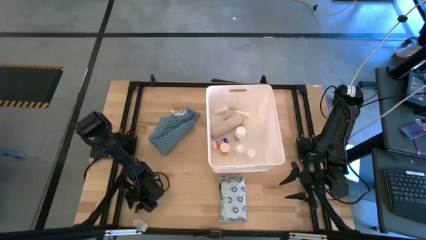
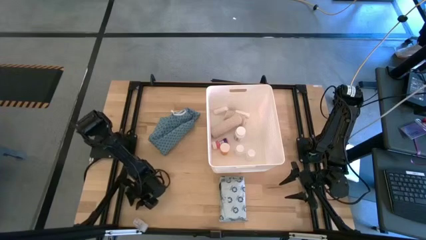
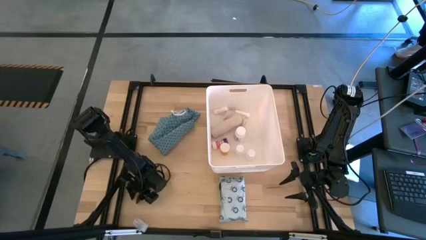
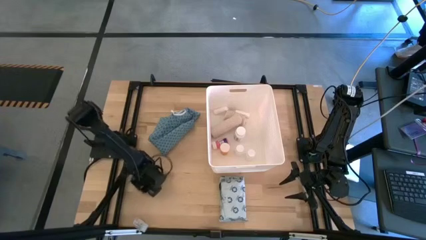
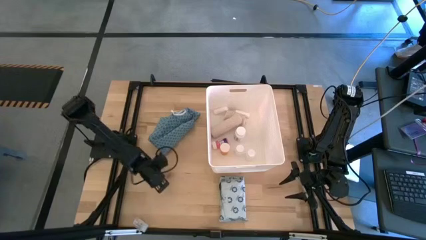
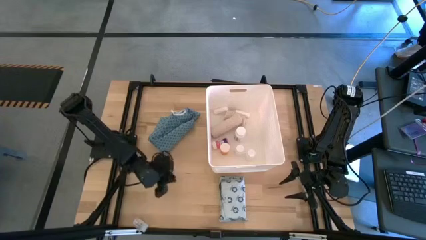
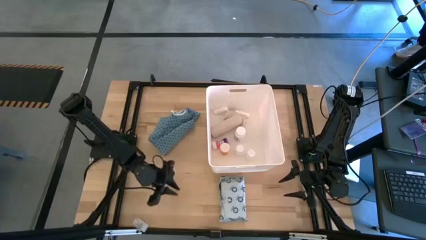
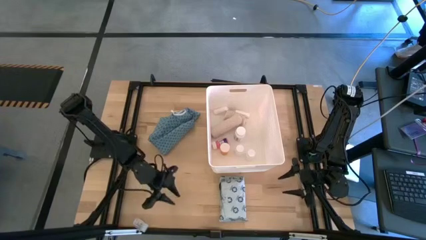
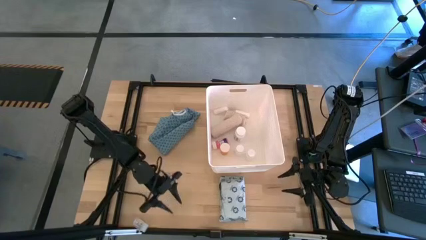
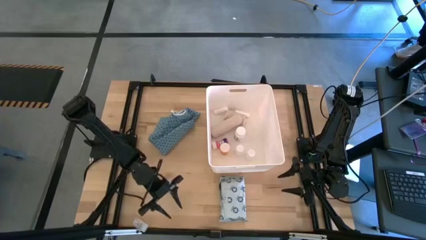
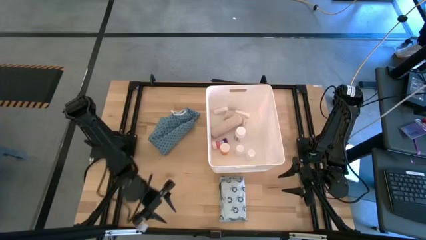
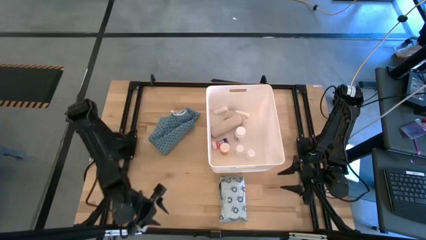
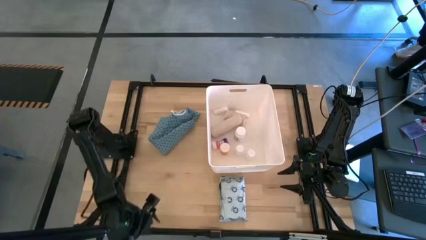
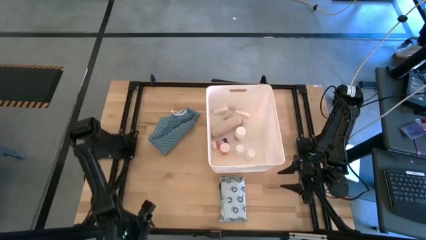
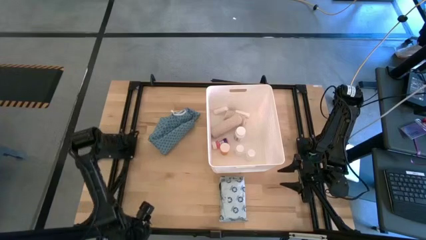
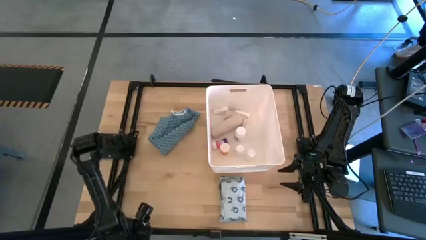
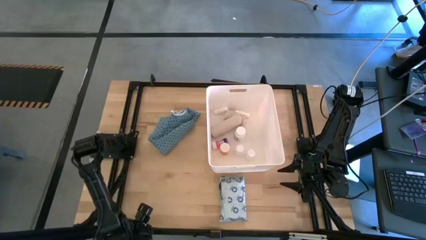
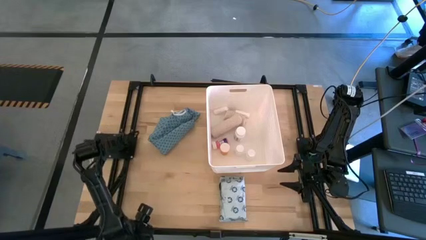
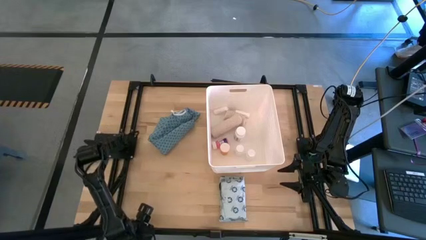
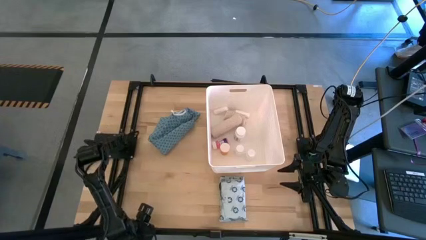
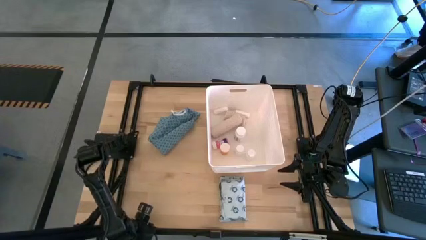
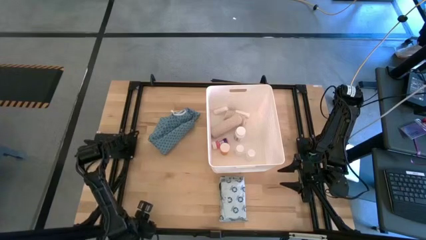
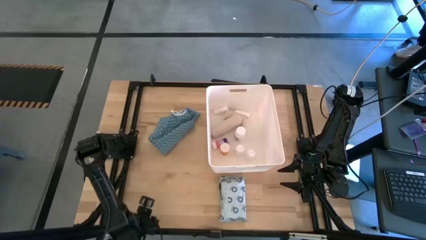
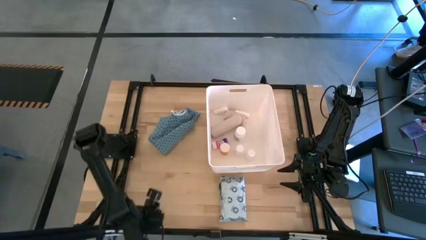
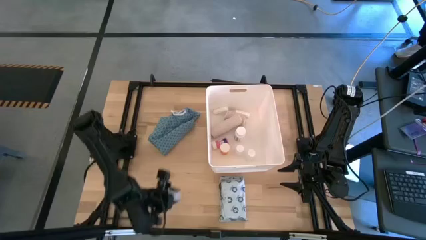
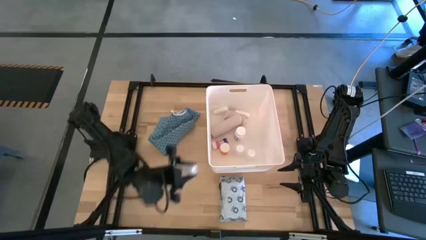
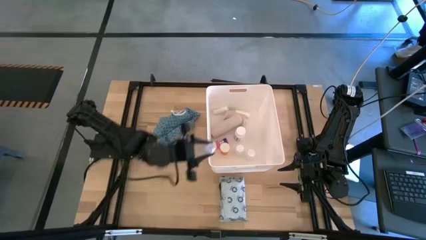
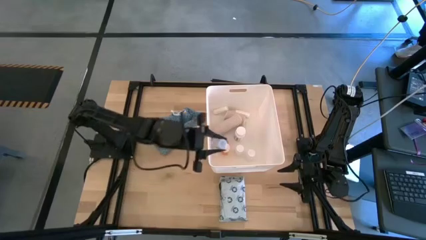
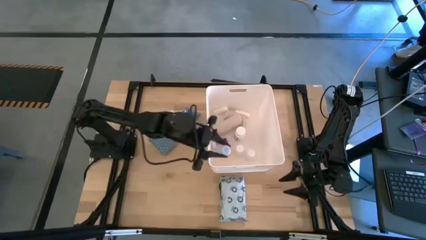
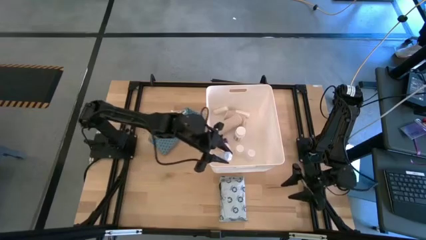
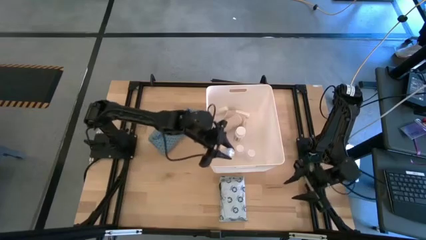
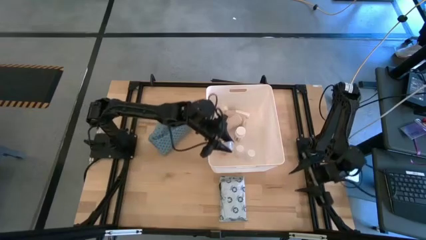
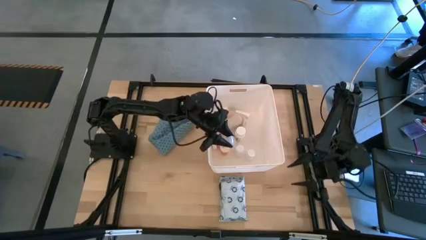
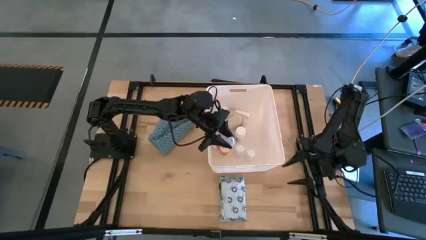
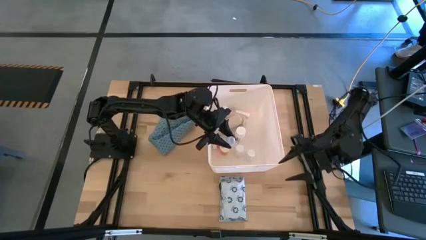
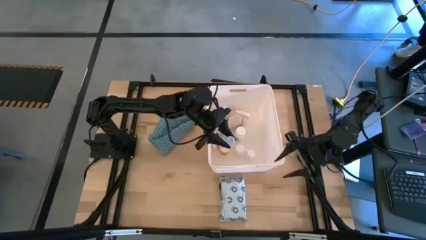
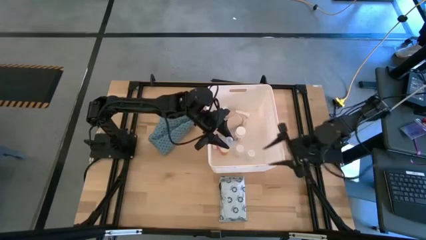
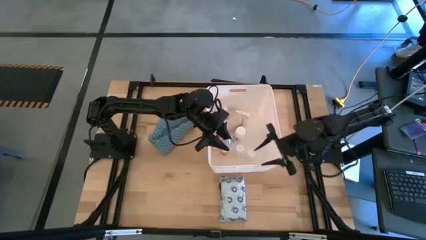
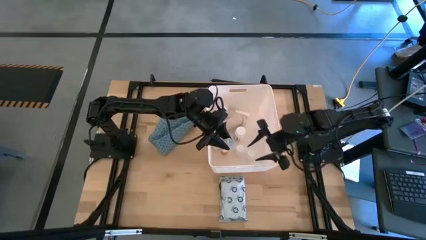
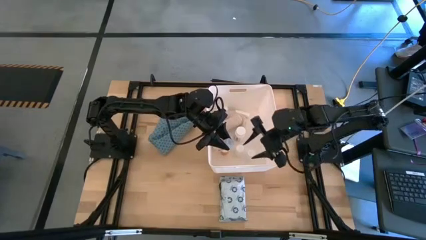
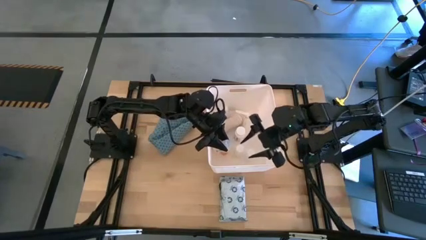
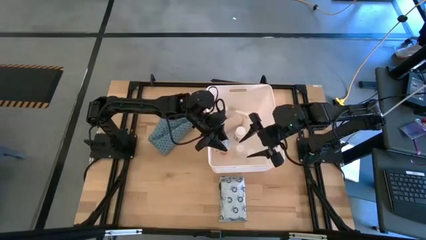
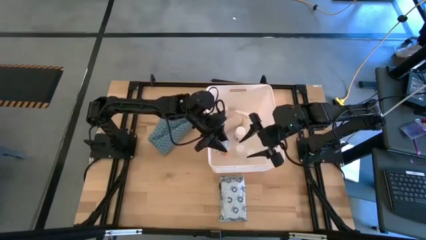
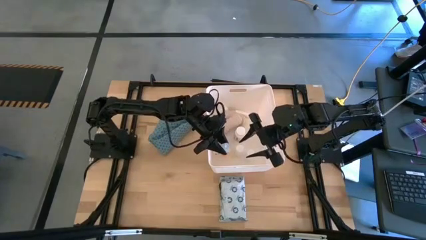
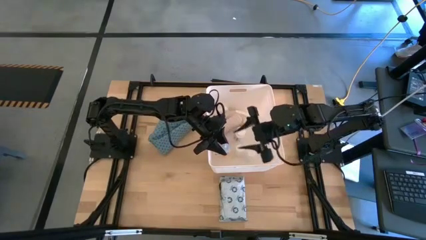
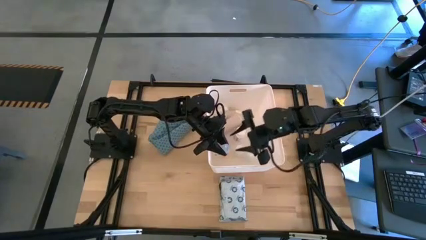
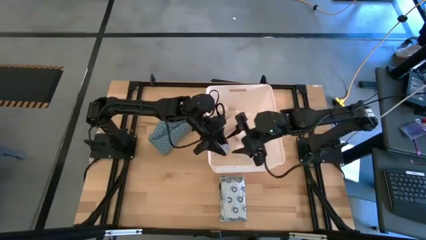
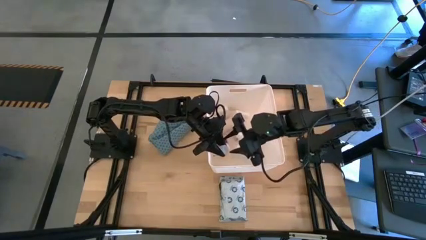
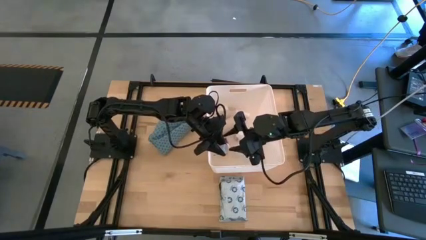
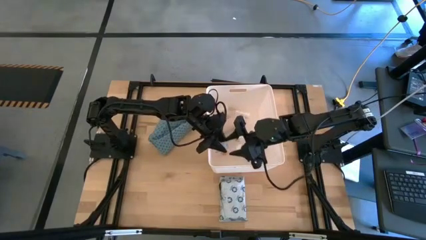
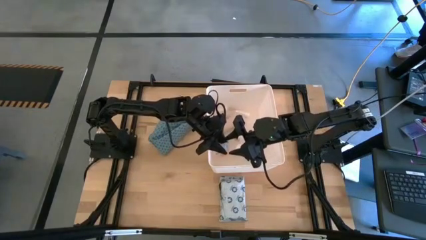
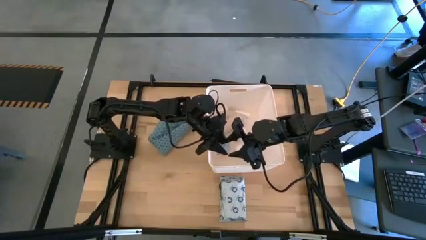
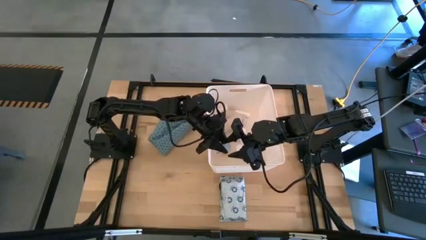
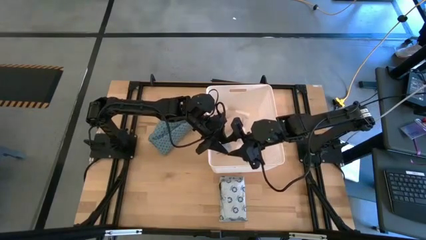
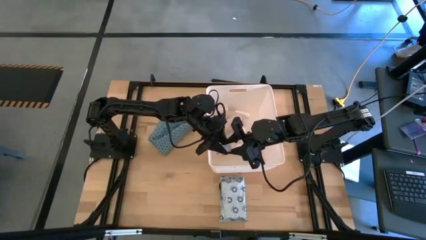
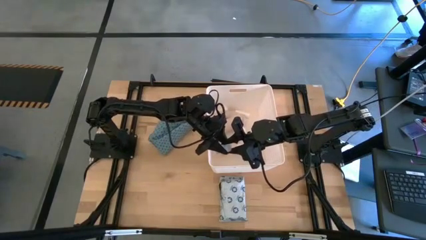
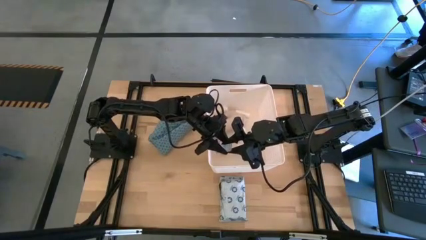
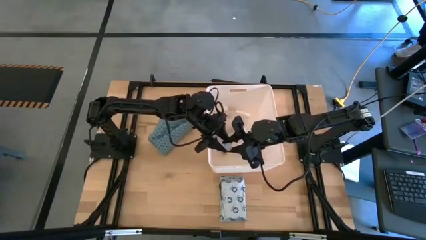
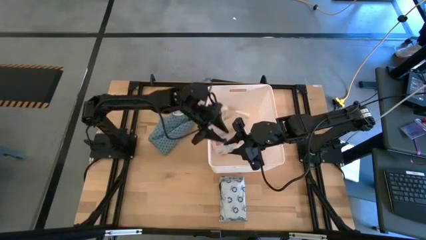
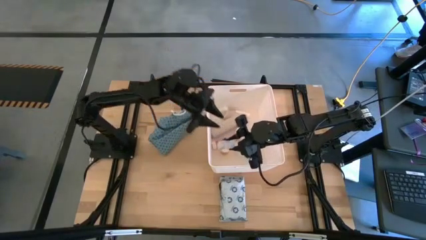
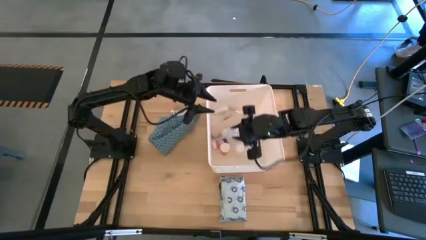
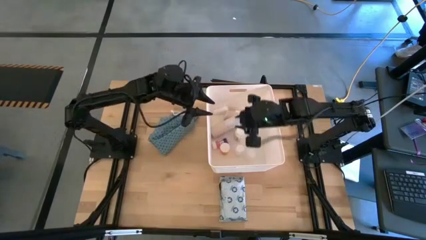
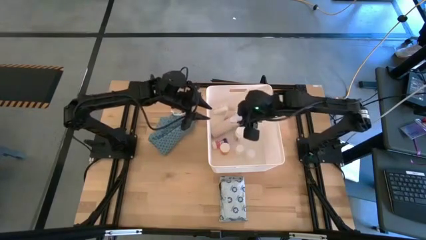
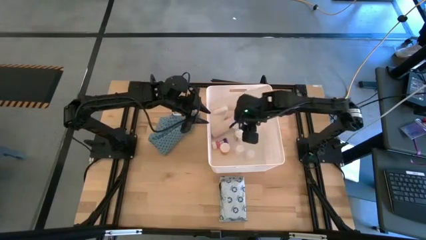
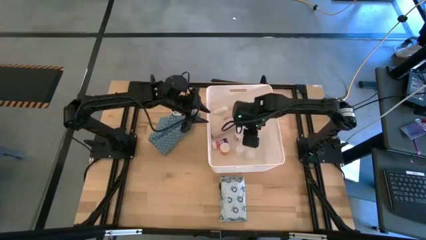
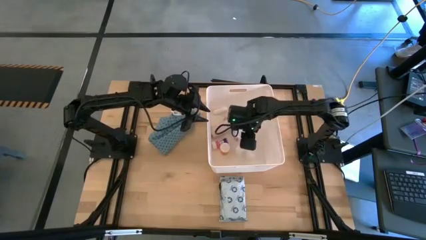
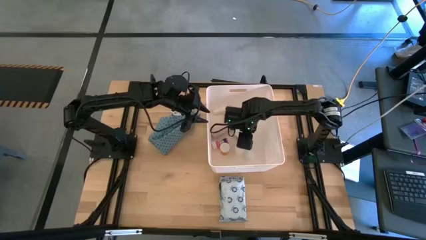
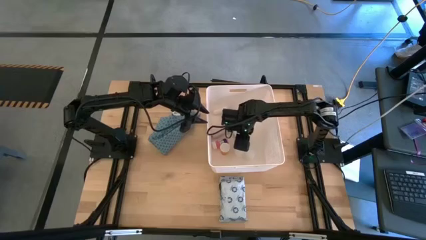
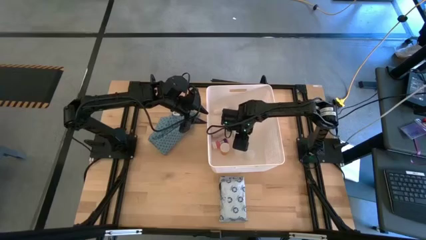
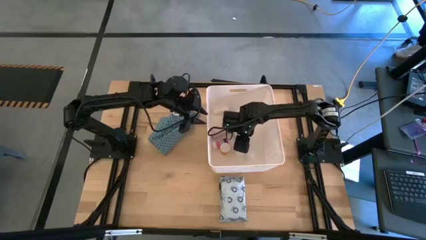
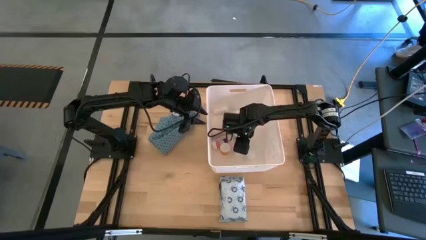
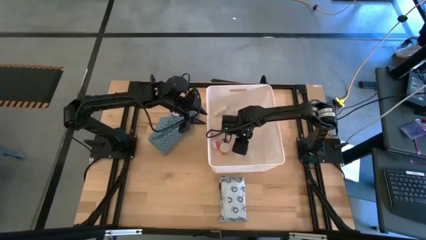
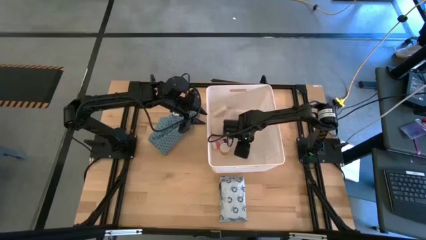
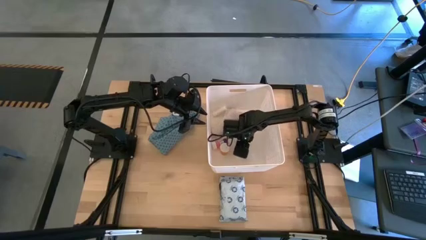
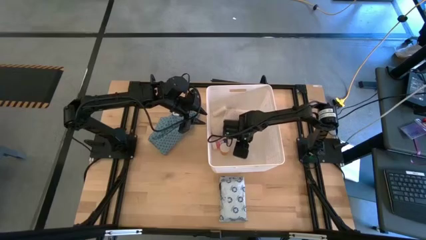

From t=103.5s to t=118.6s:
Task: Pick & place medical supplies in basket/bin
Put the transparent medicine bottle into the white bin
